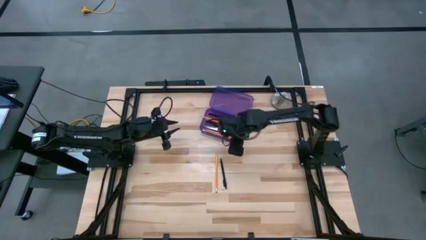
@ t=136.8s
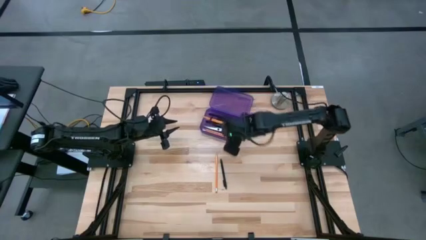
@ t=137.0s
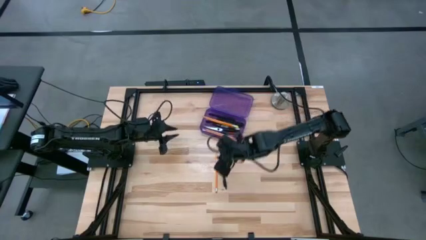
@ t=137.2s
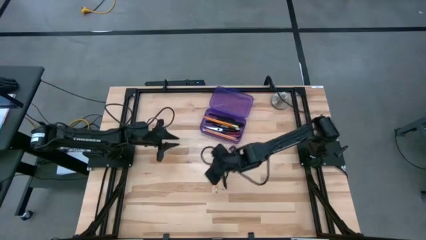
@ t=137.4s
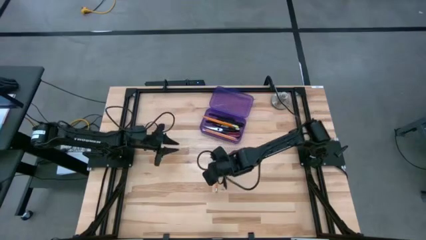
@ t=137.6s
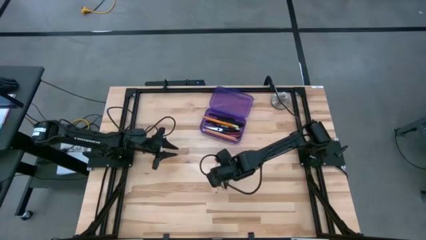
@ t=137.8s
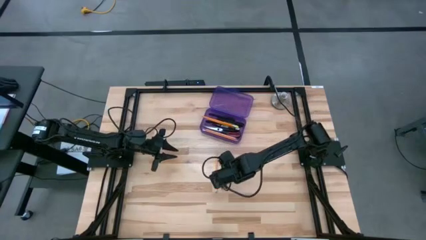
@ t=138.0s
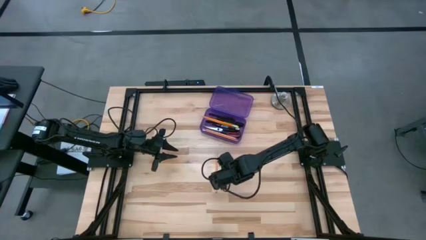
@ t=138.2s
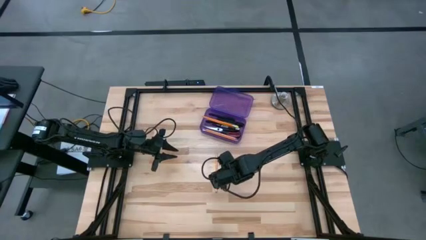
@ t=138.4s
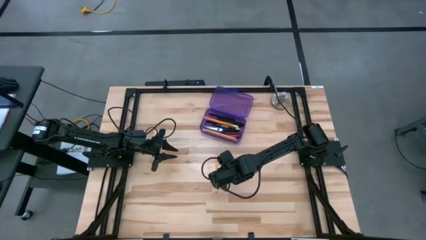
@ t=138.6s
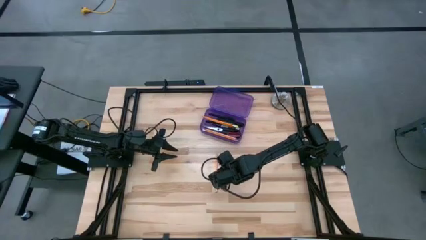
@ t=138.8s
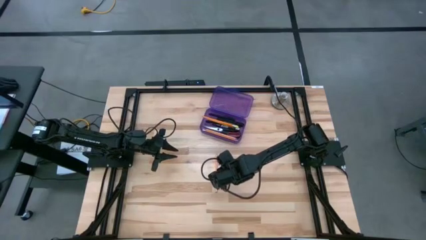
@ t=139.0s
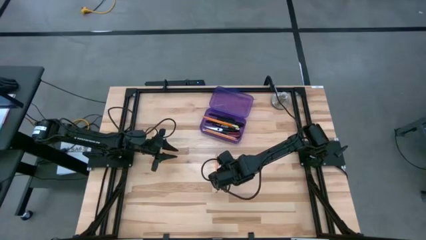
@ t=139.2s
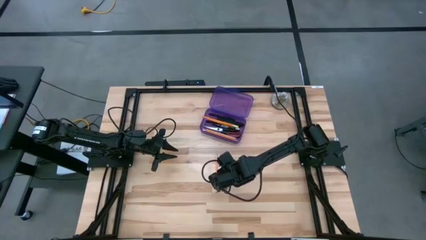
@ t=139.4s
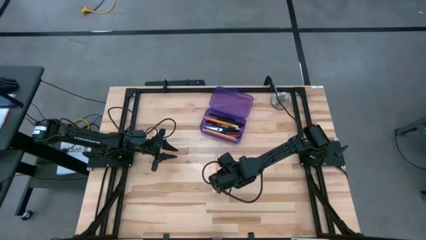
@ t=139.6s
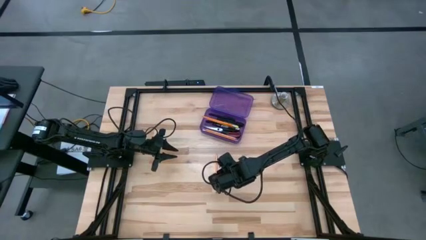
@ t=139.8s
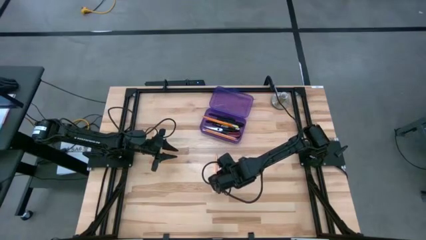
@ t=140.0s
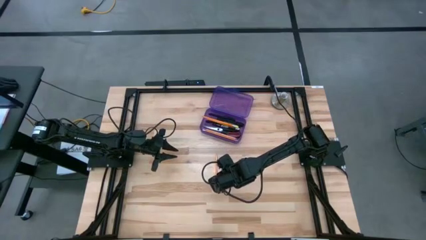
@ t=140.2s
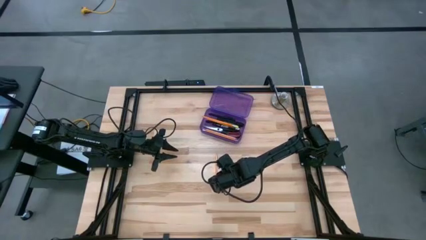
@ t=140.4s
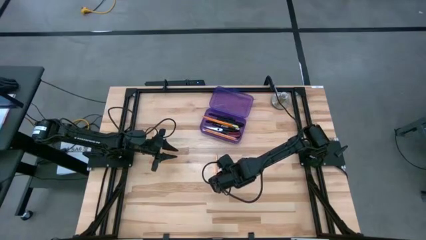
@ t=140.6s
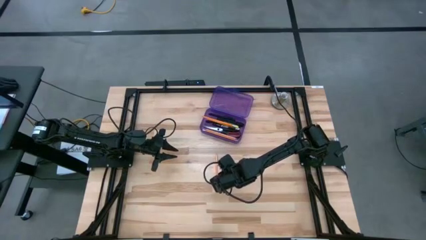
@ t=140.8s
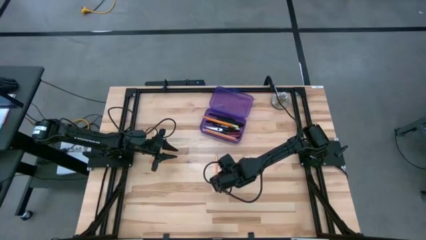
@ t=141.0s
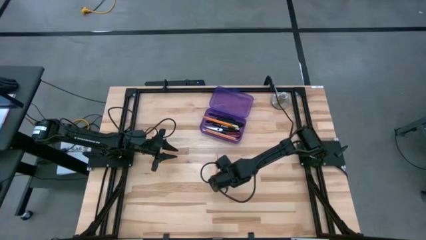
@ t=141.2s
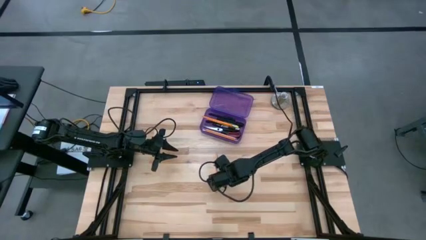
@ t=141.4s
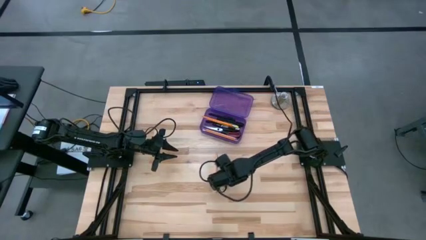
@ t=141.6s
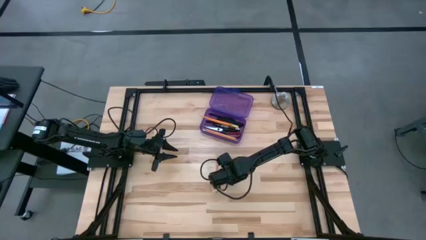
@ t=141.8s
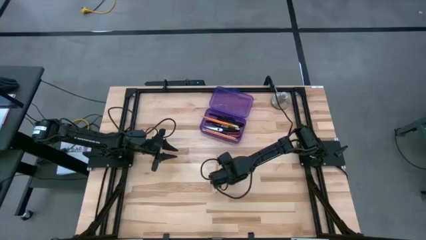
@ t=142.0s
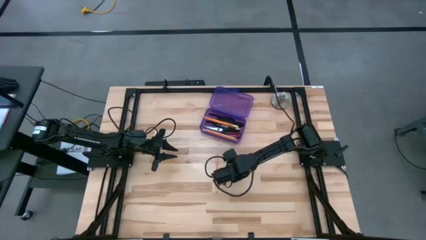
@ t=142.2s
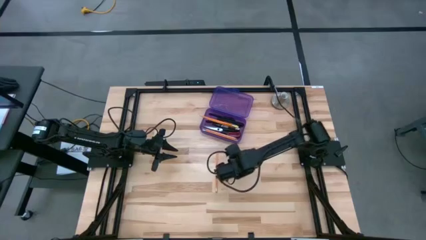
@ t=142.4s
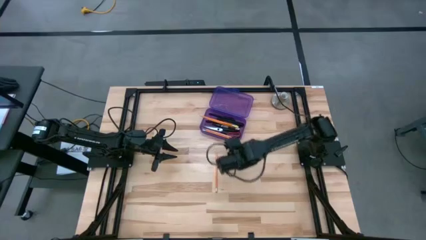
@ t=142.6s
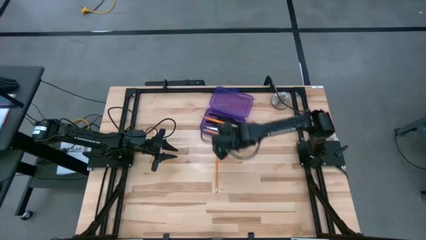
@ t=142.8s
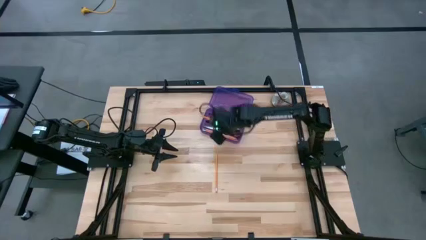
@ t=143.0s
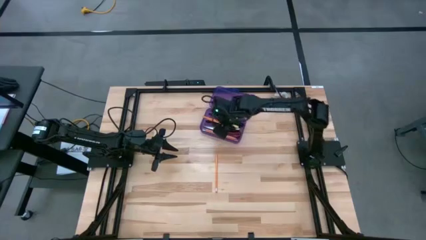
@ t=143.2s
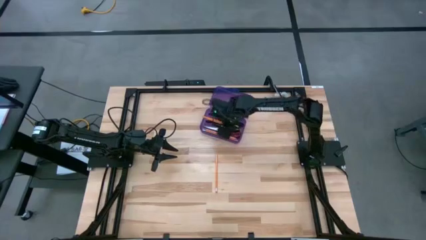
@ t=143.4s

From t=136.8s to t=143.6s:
Task: Pick & place school supplies into a supply box
Put the black pen into the violet supply box

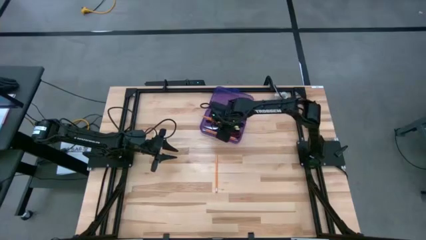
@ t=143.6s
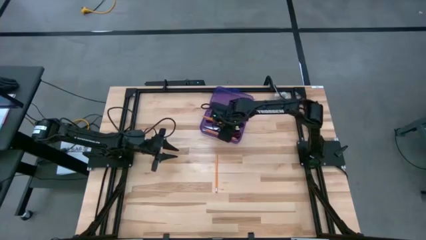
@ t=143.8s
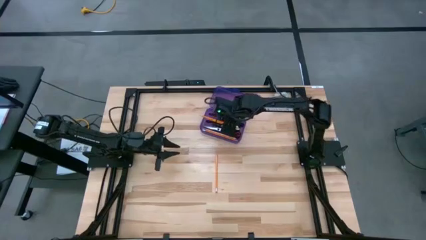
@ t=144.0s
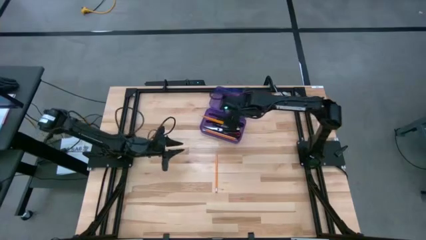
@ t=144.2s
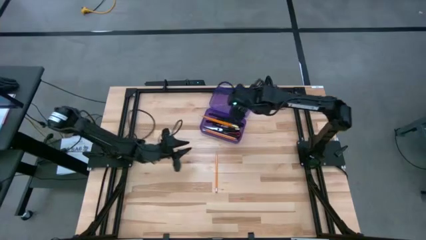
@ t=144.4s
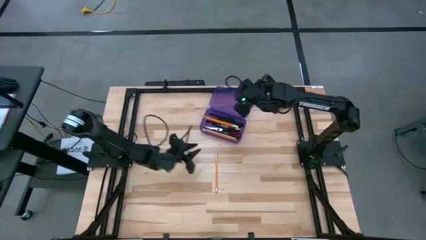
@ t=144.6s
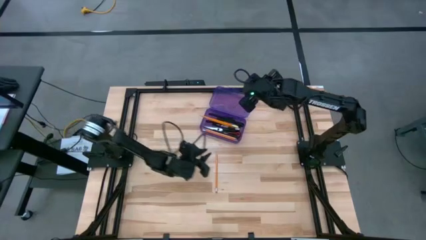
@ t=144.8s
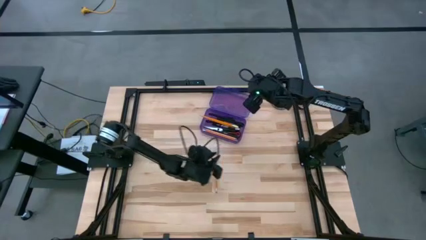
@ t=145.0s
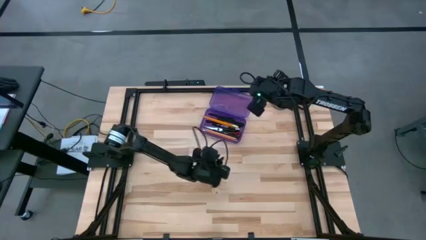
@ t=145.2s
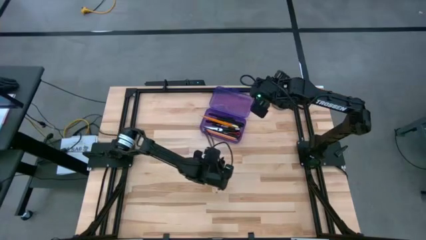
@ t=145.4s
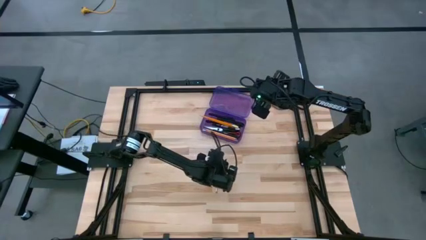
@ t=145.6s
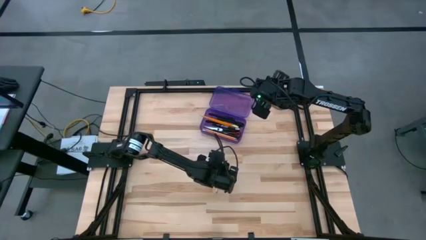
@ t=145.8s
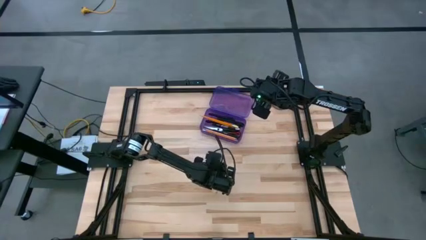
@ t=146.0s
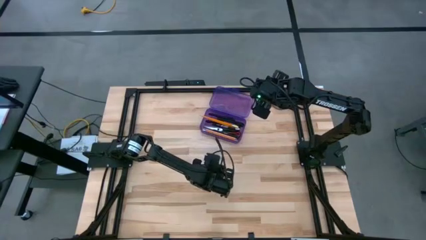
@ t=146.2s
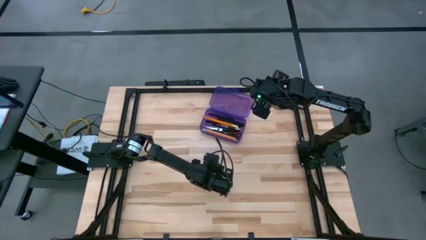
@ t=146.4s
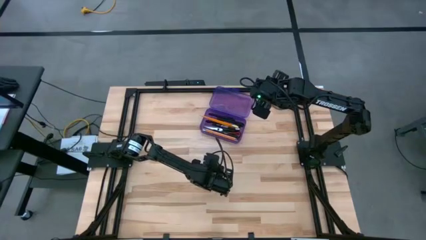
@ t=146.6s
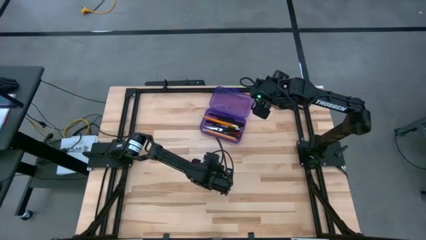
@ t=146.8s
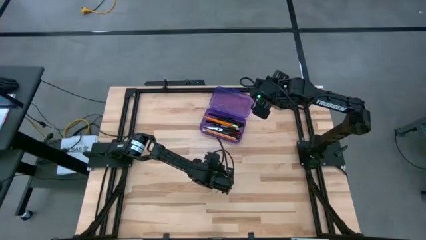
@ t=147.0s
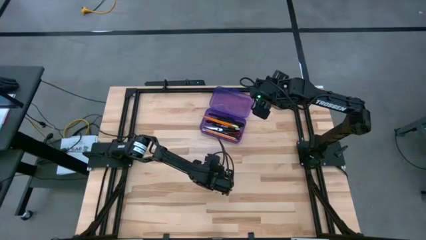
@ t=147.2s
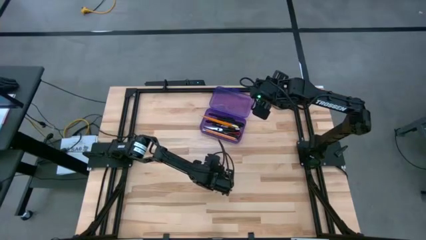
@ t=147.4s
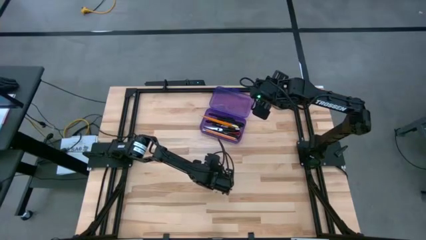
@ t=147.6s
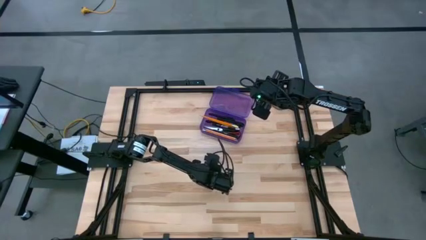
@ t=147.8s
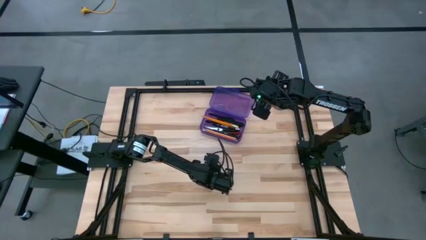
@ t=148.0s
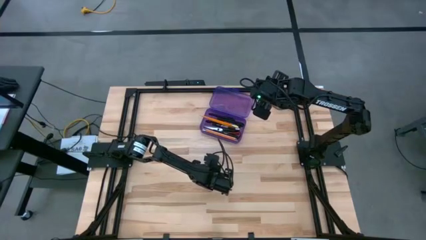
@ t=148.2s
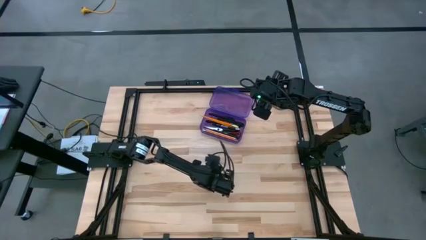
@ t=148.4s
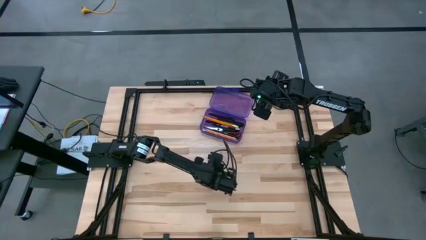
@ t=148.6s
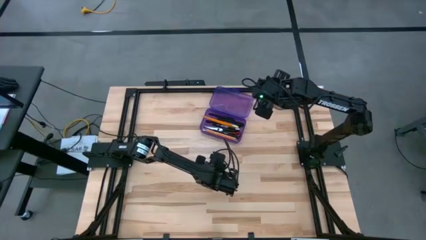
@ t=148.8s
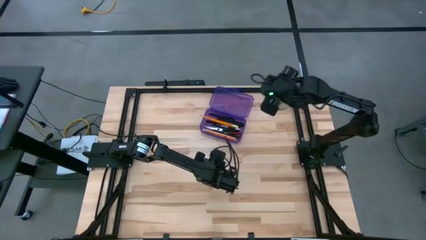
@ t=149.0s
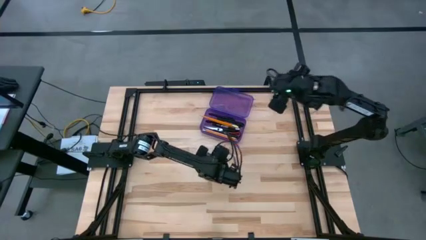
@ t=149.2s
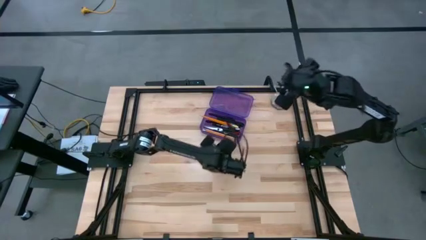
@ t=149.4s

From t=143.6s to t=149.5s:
Put the orange pencil into the violet supply box

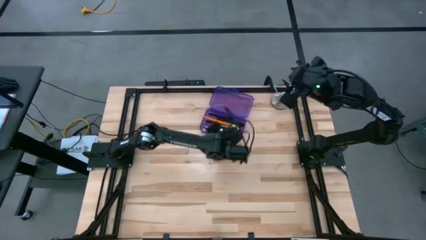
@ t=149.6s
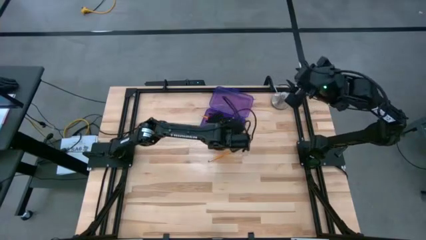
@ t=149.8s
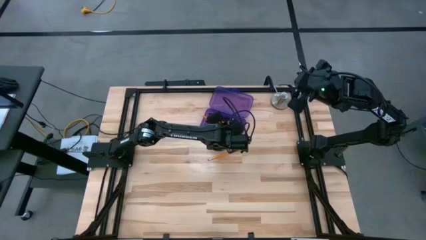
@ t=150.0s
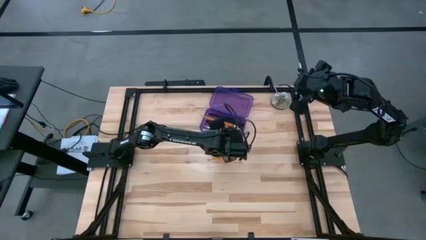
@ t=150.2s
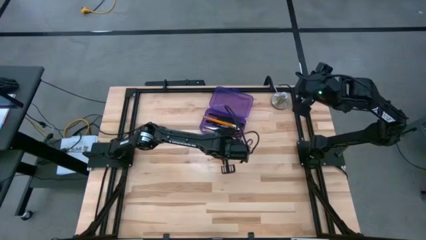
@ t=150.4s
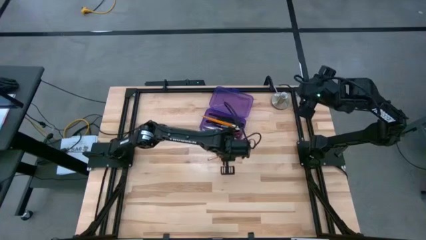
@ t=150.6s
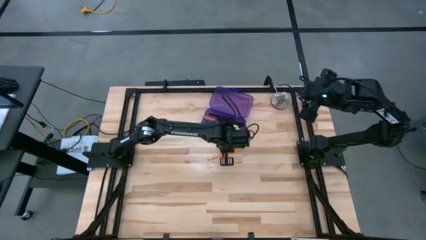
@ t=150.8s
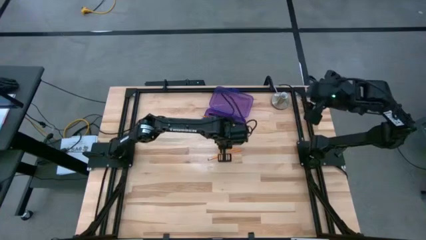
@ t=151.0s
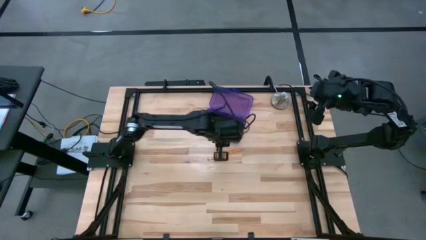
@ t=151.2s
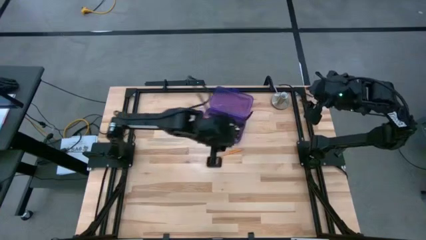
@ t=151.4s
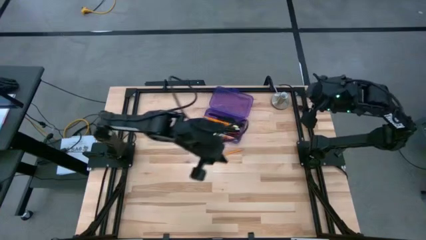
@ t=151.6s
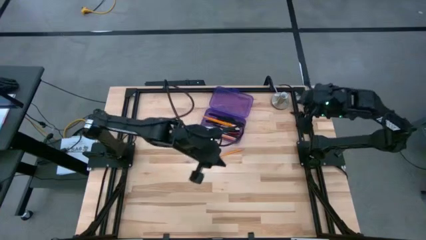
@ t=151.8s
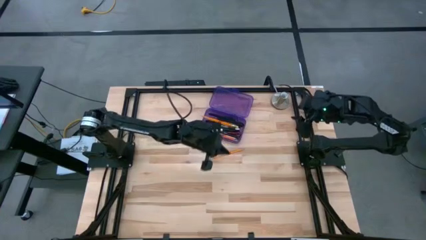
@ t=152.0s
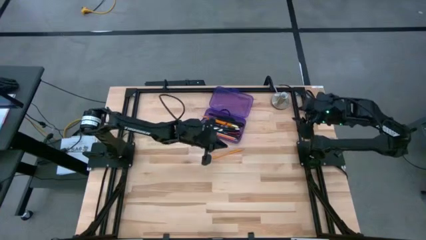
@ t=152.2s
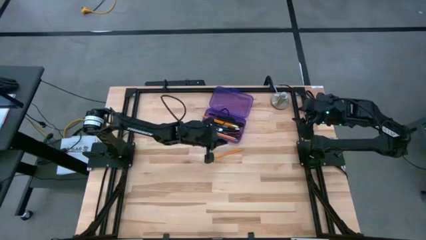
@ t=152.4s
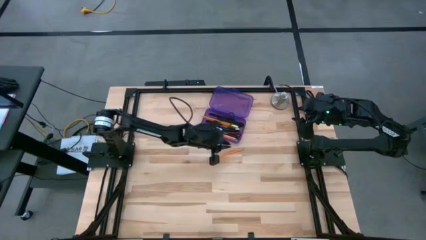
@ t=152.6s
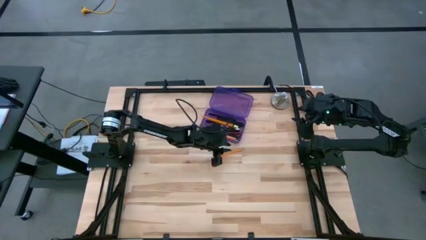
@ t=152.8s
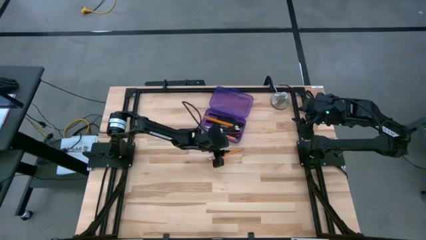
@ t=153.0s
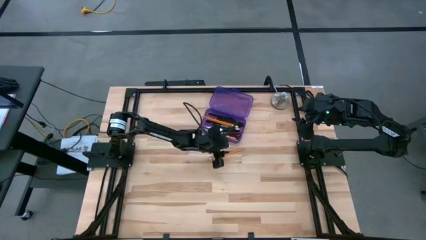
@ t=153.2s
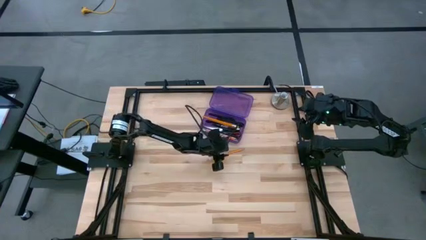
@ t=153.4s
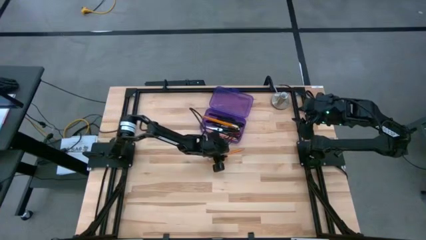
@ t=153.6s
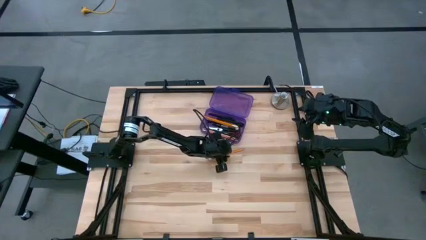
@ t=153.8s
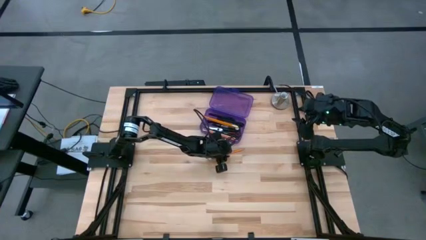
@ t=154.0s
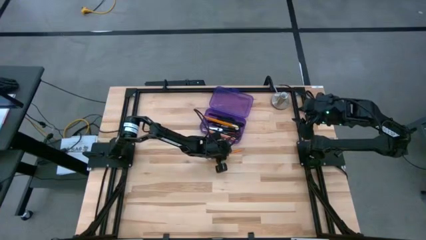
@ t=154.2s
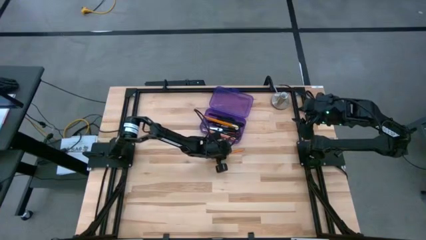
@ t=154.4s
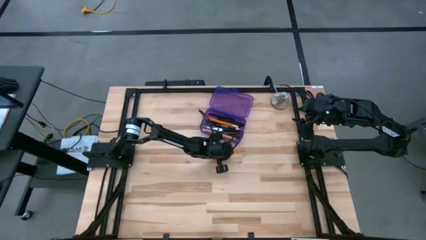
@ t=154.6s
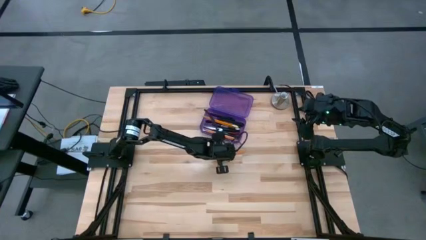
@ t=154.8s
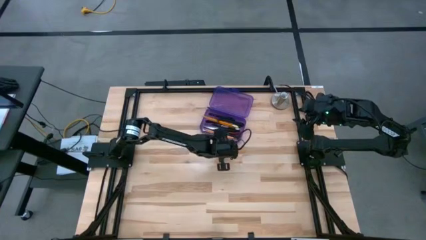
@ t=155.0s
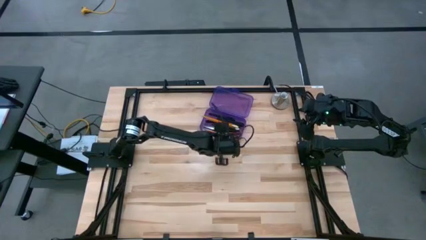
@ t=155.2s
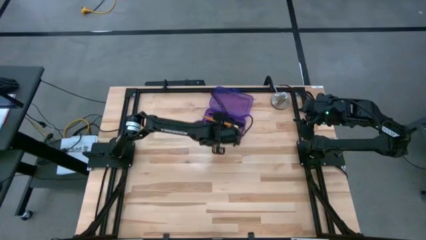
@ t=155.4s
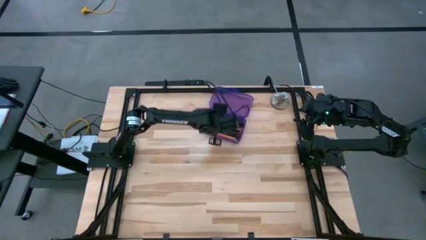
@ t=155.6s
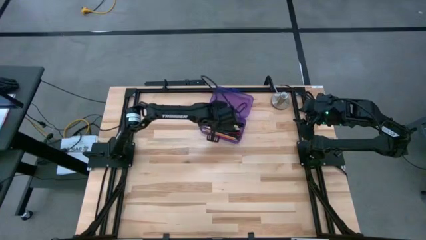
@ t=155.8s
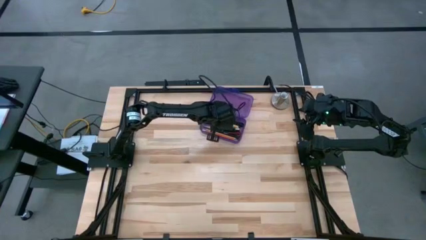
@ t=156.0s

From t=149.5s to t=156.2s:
Put the orange pencil into the violet supply box
